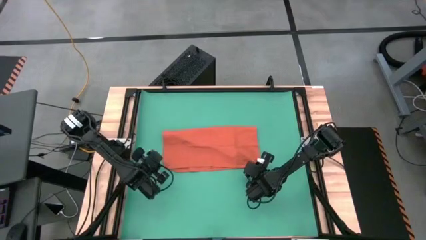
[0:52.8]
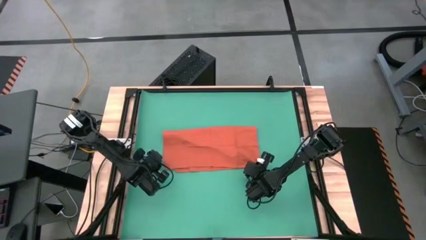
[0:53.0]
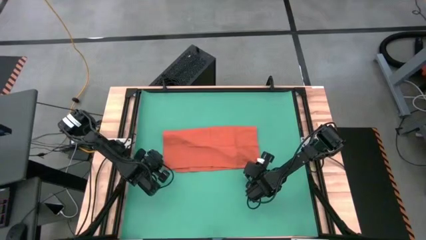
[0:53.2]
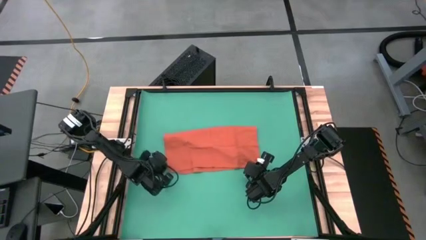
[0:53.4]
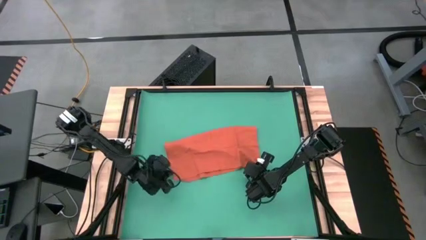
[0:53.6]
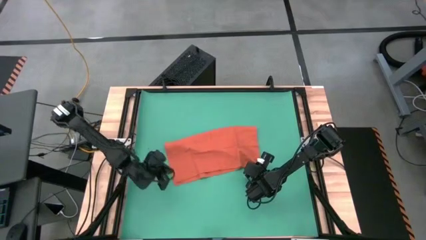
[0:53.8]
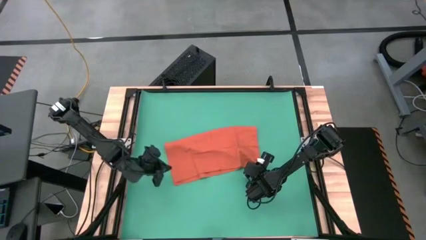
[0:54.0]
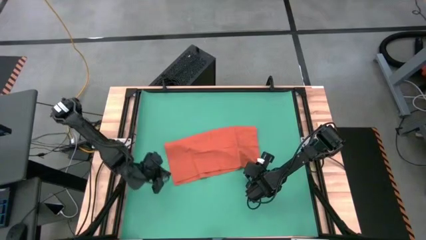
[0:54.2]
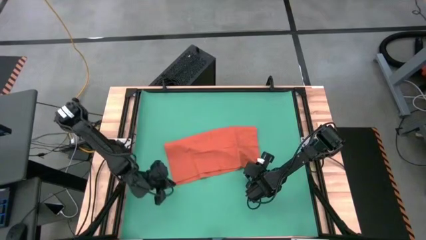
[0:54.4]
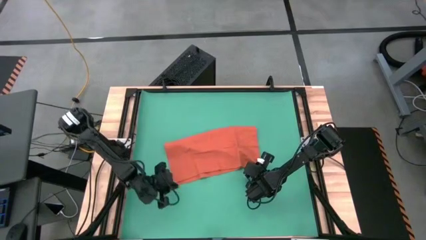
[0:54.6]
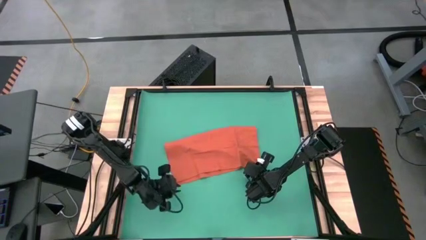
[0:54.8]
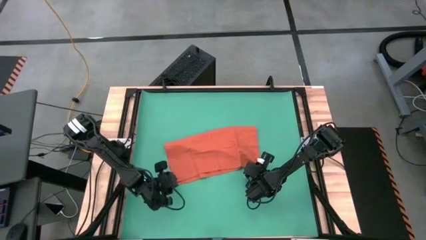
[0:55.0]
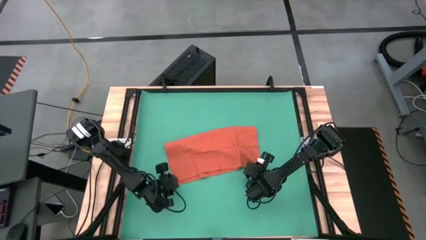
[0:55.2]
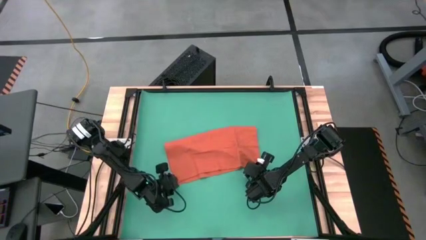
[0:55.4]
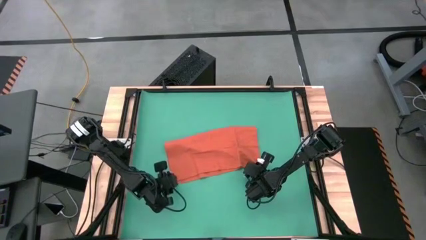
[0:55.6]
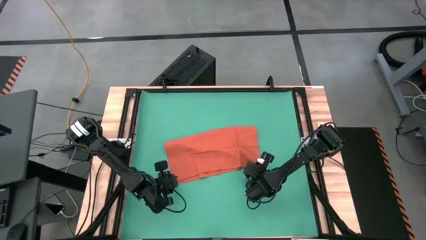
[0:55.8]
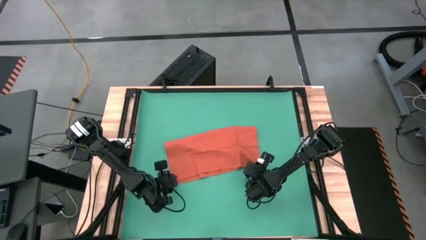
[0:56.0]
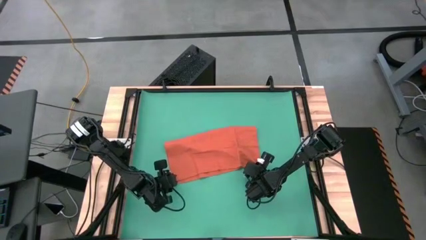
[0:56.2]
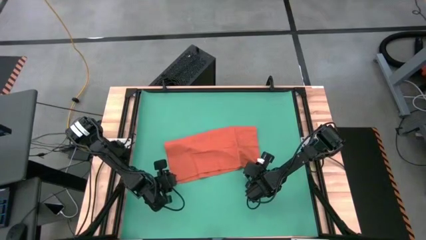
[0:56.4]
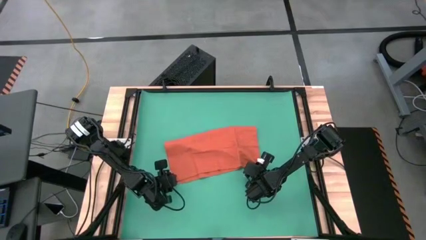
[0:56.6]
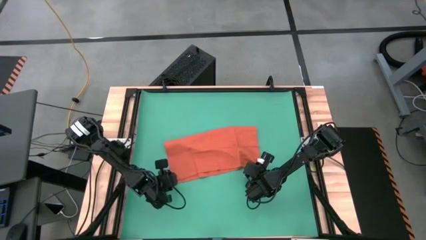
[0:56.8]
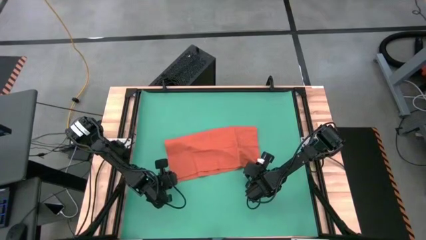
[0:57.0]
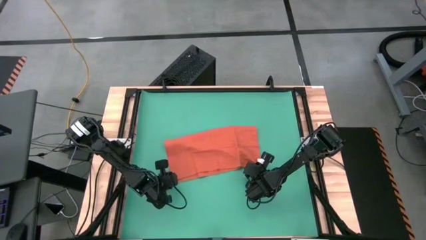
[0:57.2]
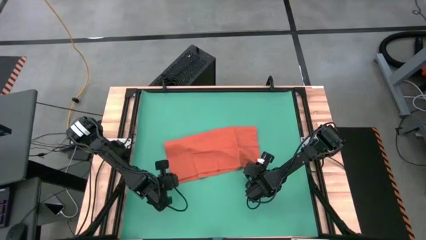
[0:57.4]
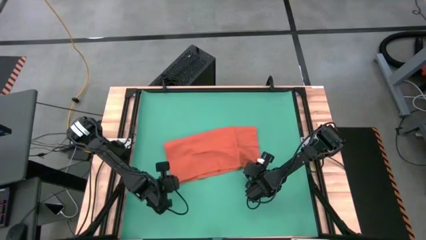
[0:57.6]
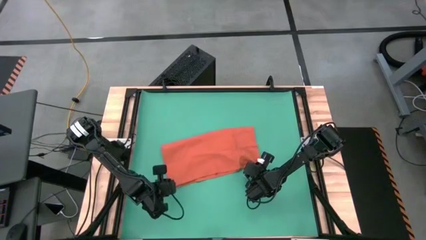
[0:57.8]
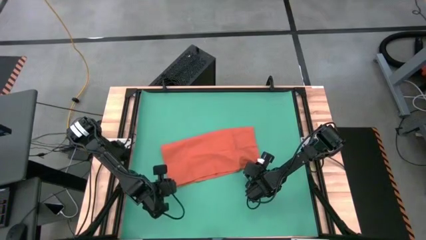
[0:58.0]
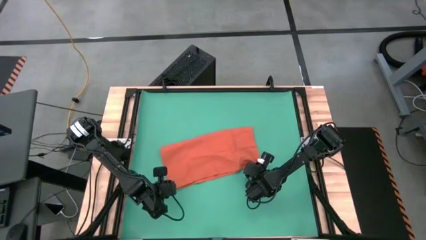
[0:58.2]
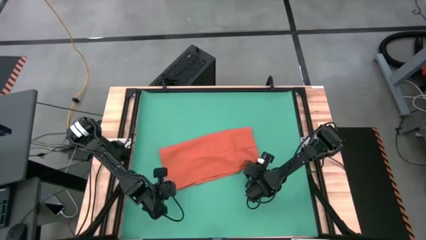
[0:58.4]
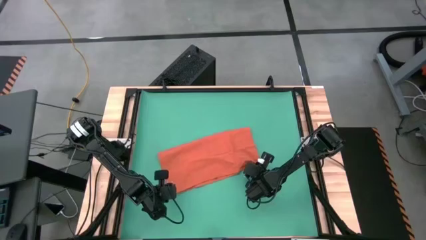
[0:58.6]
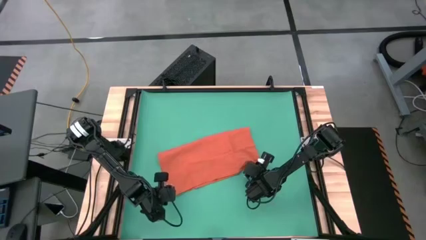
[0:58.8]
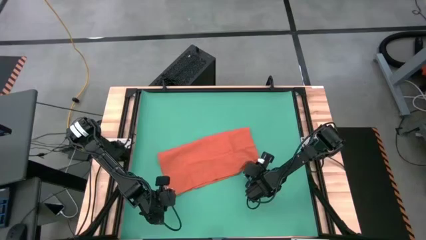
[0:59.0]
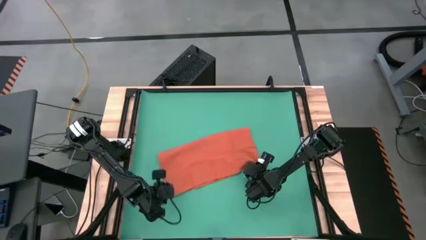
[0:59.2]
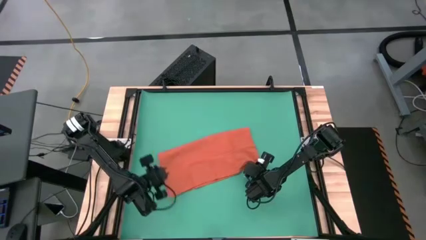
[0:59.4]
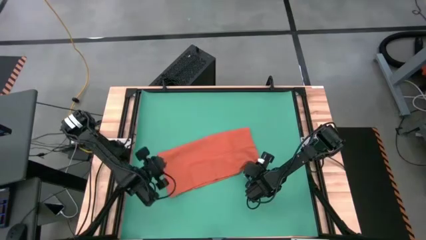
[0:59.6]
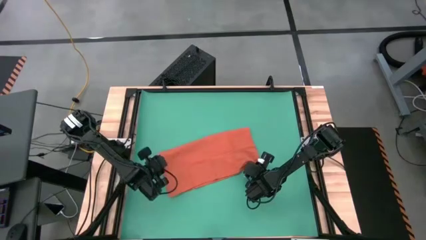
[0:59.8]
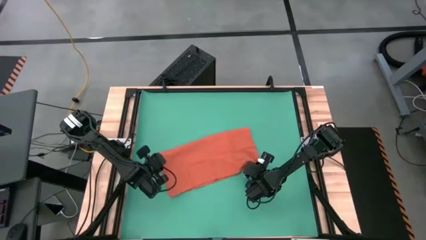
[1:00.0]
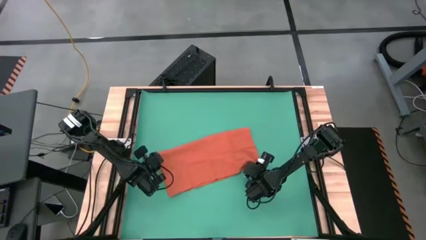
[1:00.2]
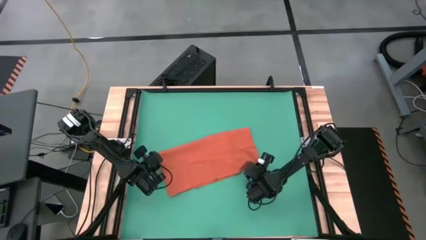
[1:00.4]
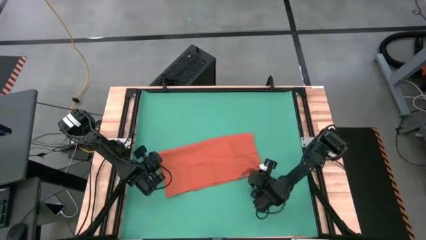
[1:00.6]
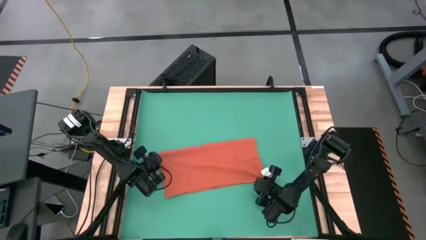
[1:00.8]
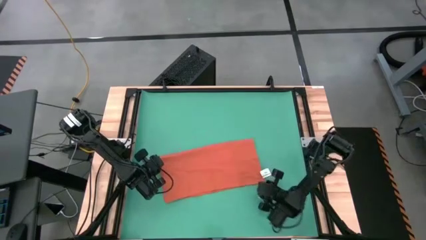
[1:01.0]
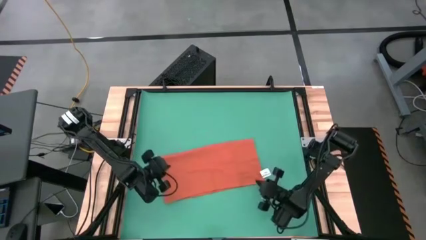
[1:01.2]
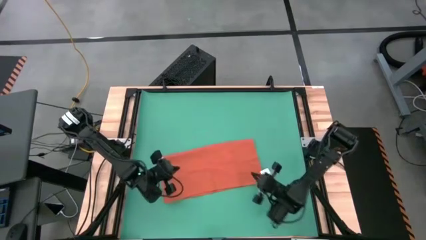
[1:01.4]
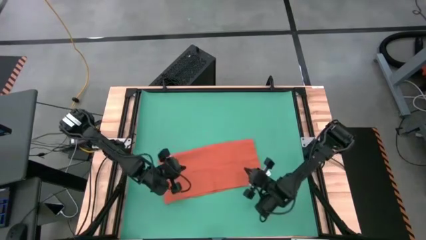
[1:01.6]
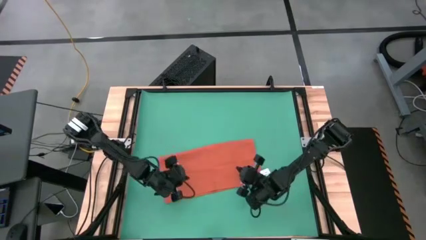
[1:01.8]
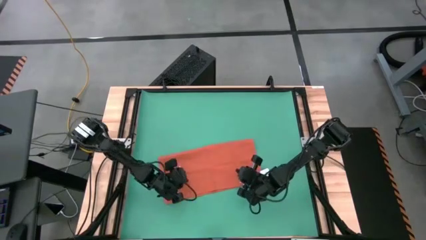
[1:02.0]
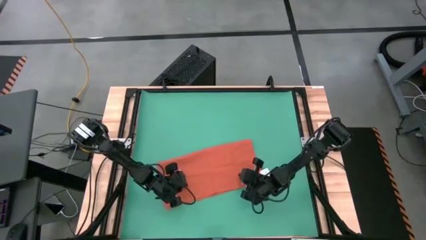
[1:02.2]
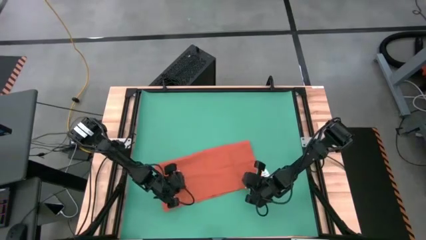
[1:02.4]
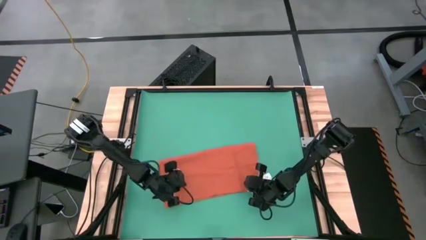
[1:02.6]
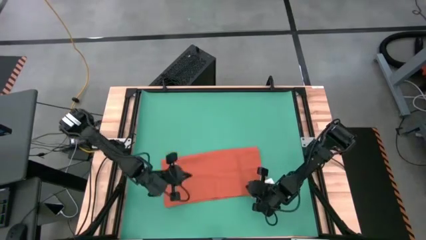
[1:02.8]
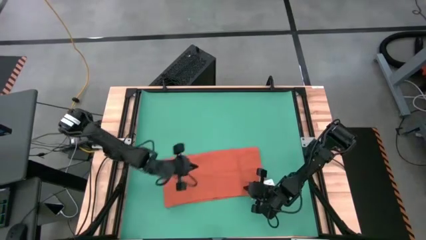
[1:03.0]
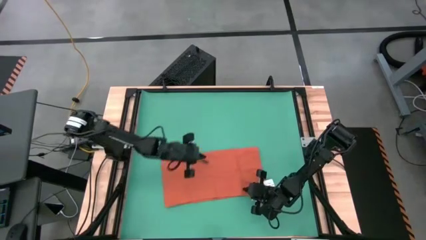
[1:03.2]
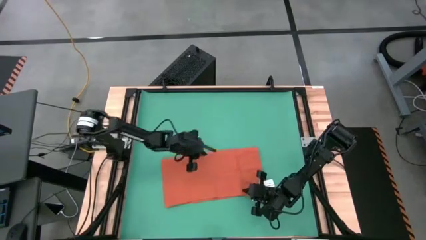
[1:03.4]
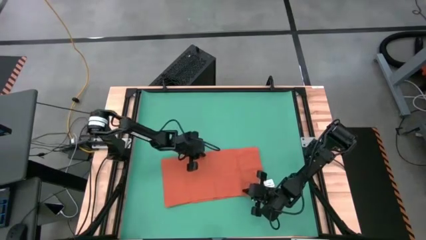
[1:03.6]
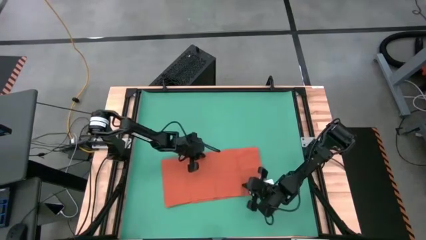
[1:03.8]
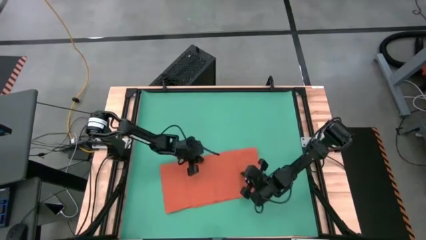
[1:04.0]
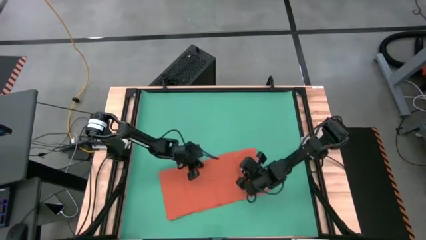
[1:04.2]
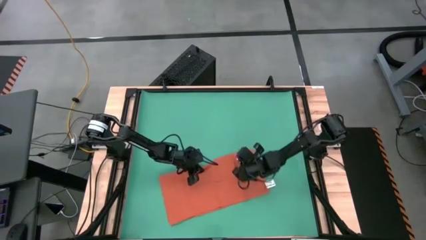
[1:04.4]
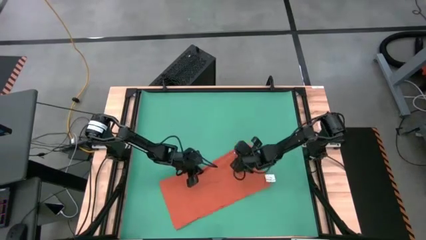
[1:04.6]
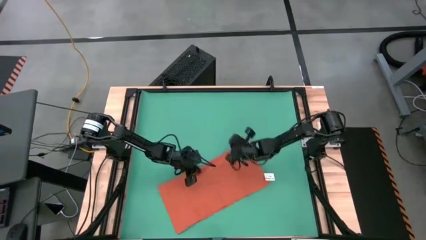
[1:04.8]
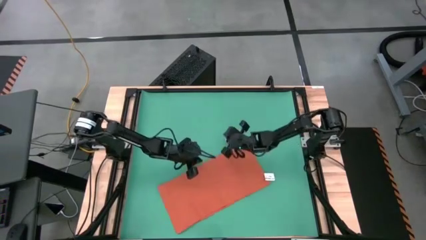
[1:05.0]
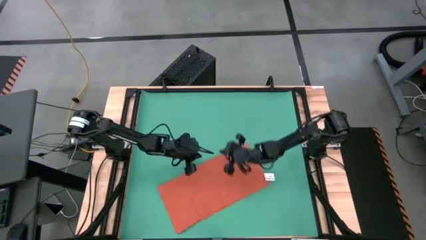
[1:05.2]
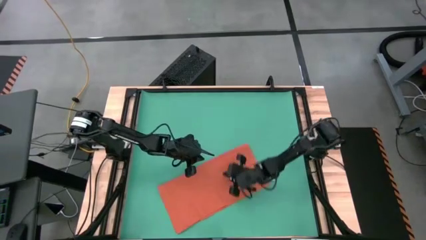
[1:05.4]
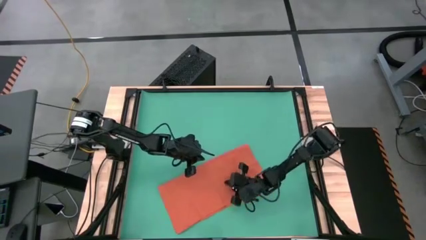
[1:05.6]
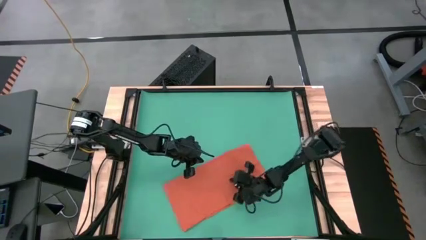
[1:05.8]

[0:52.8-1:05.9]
Task: Roll towel
Fold the orange towel
